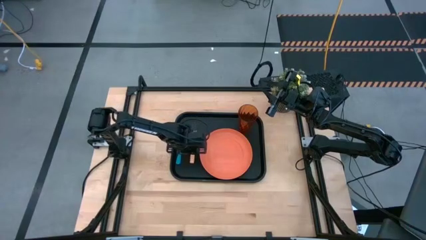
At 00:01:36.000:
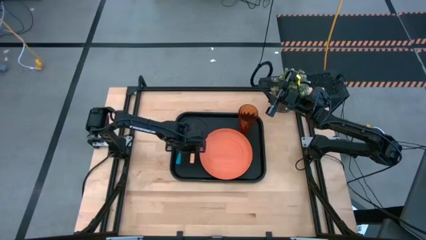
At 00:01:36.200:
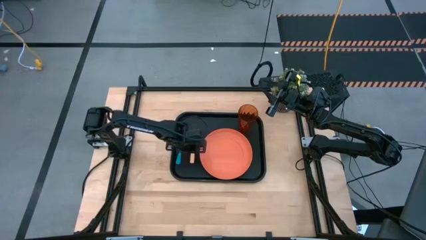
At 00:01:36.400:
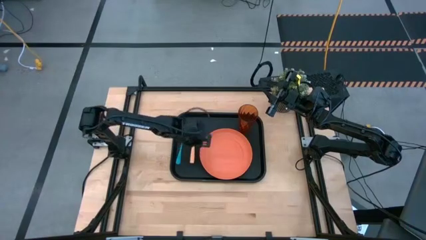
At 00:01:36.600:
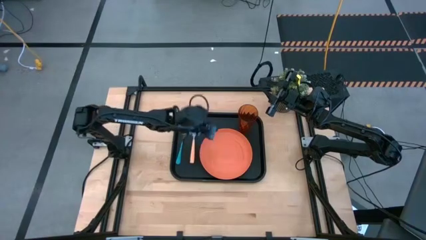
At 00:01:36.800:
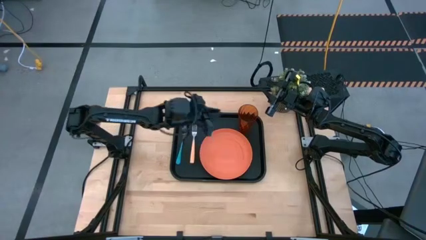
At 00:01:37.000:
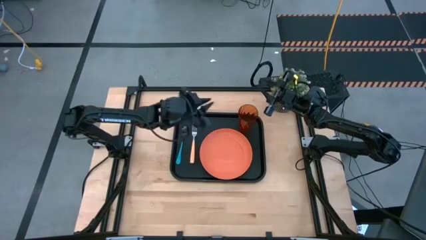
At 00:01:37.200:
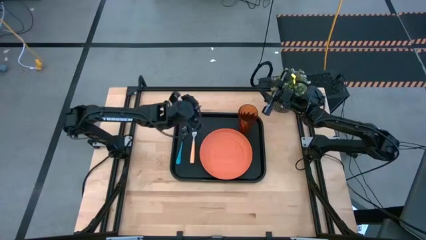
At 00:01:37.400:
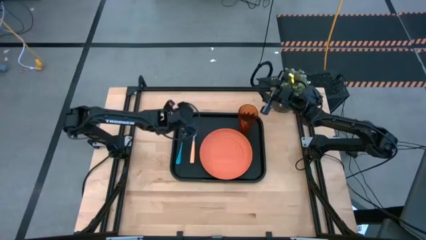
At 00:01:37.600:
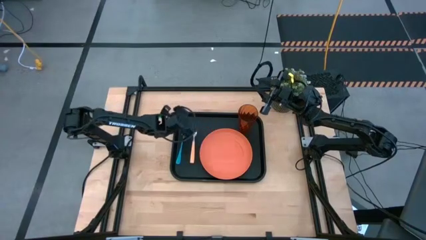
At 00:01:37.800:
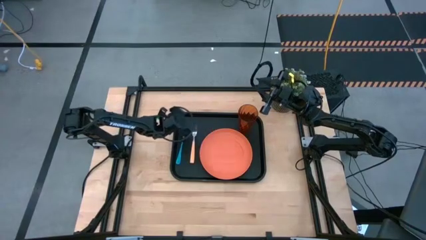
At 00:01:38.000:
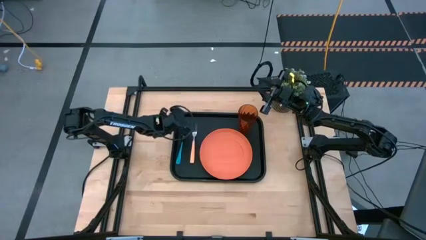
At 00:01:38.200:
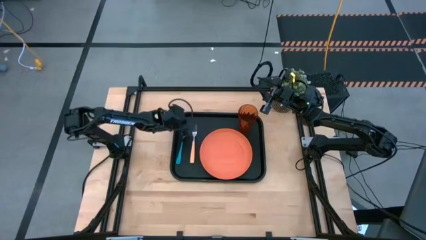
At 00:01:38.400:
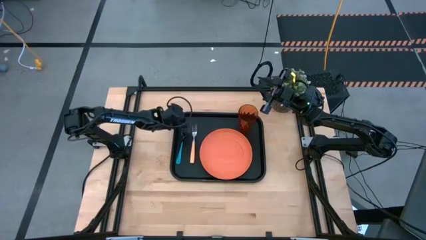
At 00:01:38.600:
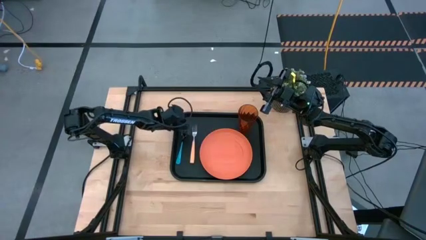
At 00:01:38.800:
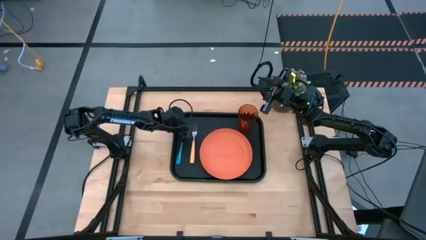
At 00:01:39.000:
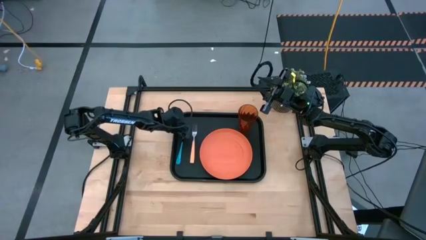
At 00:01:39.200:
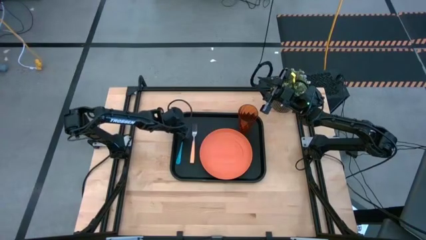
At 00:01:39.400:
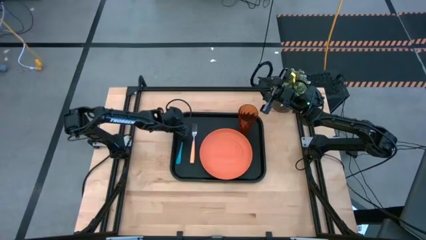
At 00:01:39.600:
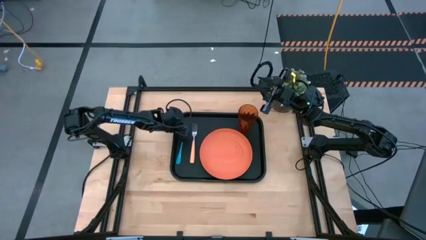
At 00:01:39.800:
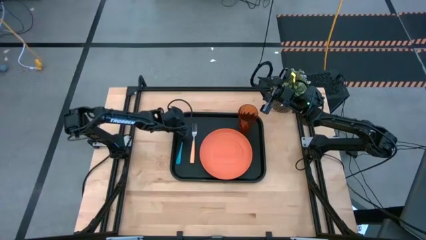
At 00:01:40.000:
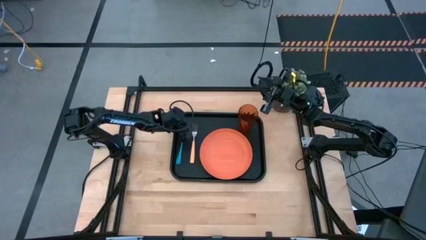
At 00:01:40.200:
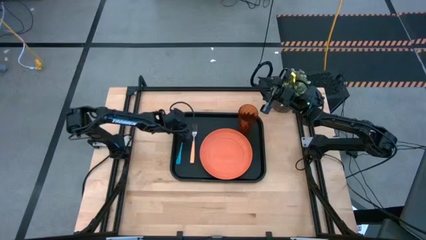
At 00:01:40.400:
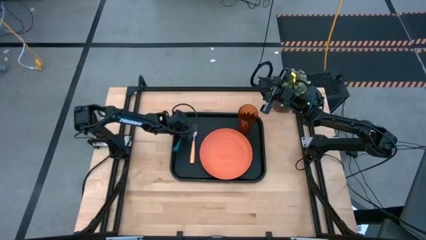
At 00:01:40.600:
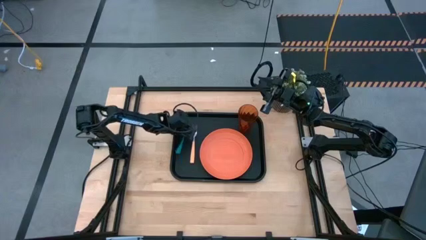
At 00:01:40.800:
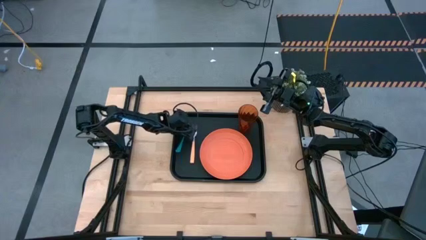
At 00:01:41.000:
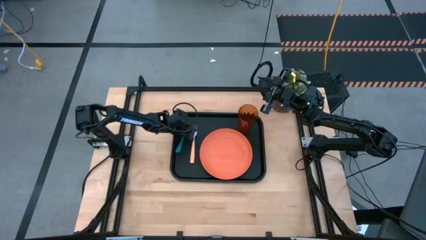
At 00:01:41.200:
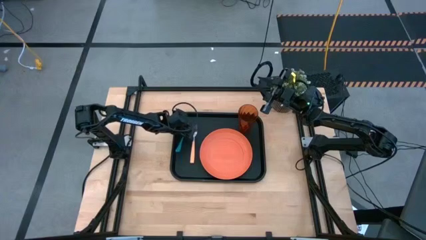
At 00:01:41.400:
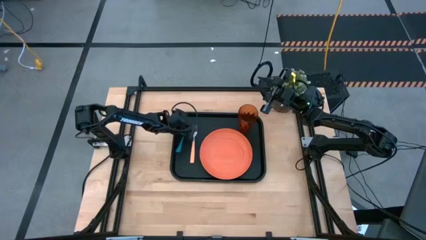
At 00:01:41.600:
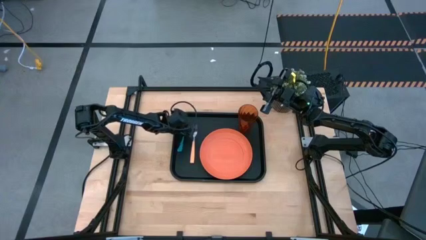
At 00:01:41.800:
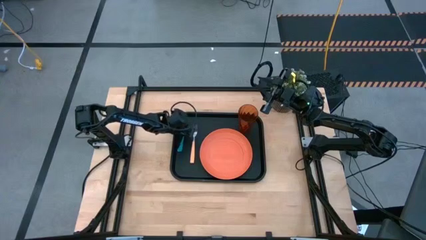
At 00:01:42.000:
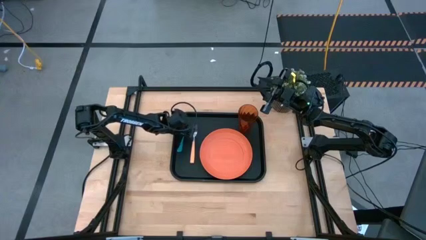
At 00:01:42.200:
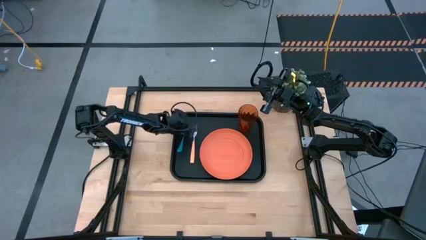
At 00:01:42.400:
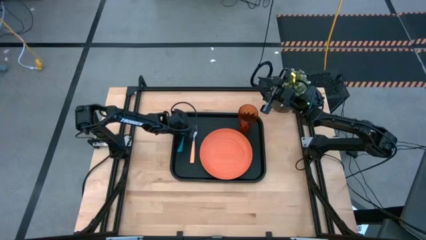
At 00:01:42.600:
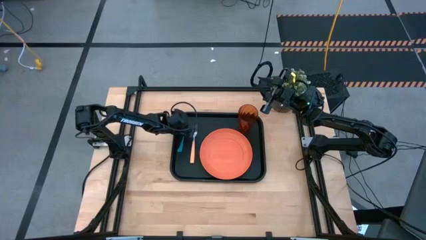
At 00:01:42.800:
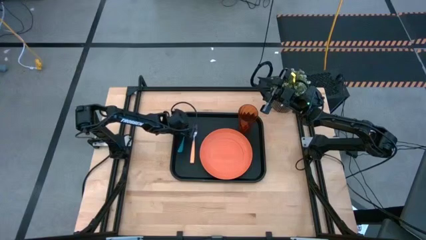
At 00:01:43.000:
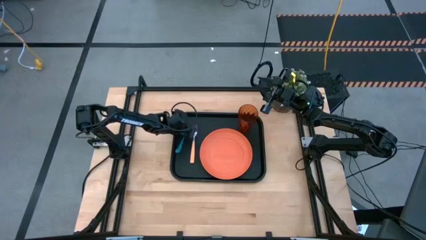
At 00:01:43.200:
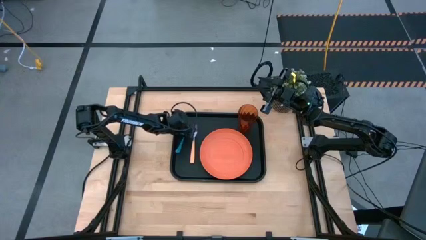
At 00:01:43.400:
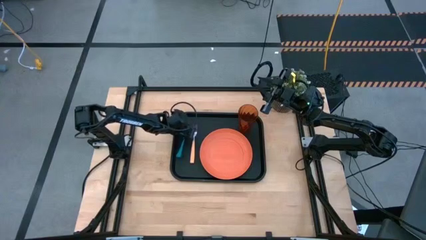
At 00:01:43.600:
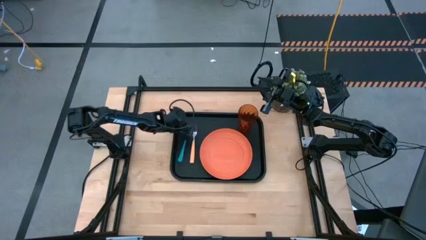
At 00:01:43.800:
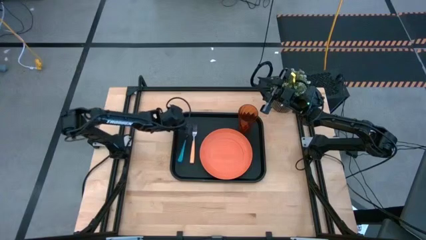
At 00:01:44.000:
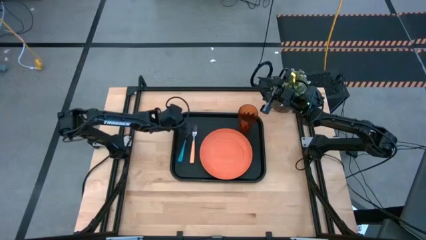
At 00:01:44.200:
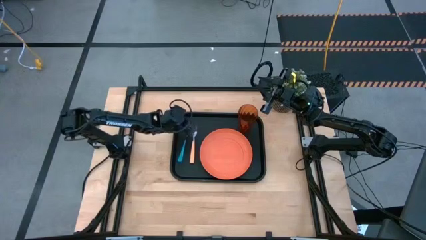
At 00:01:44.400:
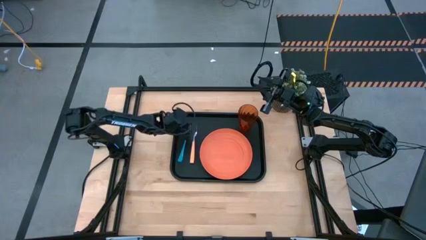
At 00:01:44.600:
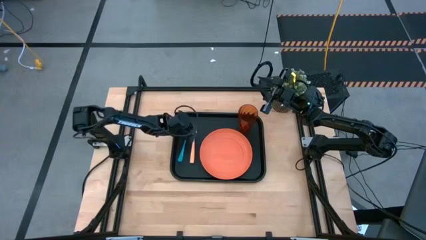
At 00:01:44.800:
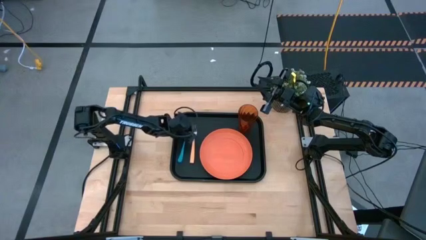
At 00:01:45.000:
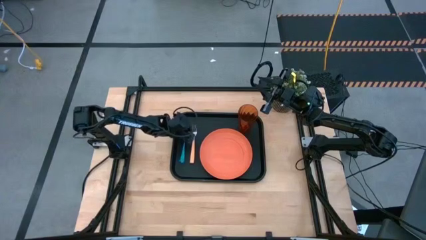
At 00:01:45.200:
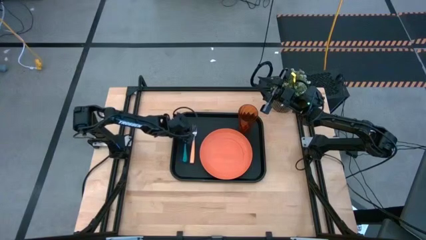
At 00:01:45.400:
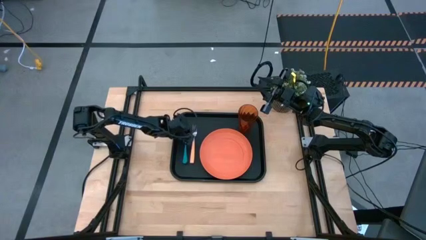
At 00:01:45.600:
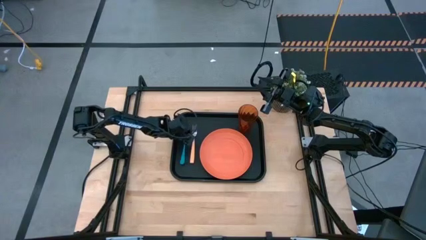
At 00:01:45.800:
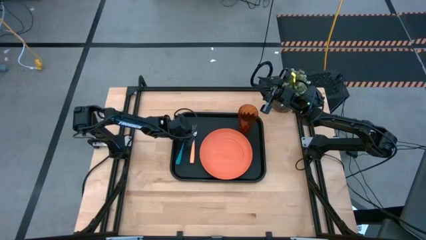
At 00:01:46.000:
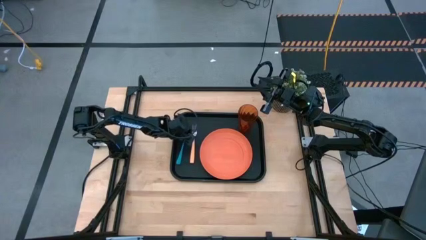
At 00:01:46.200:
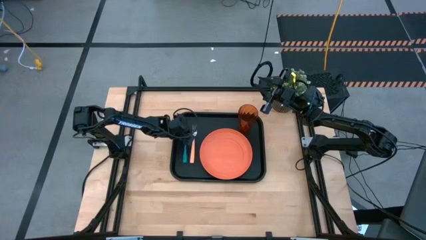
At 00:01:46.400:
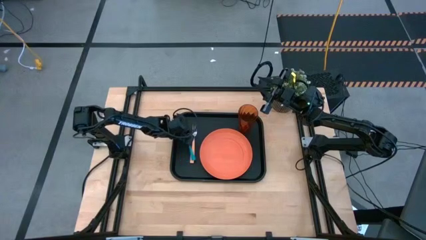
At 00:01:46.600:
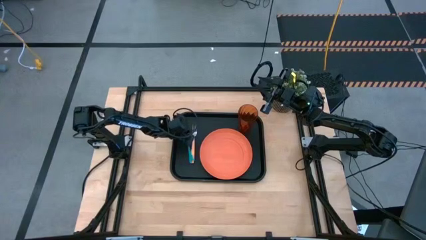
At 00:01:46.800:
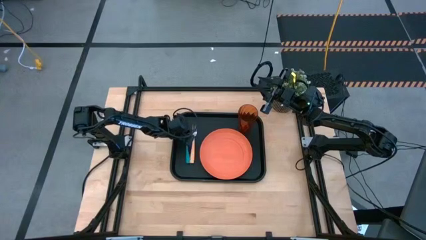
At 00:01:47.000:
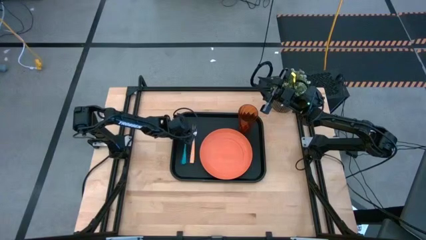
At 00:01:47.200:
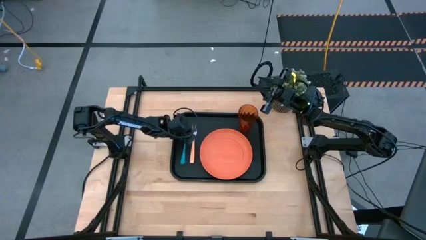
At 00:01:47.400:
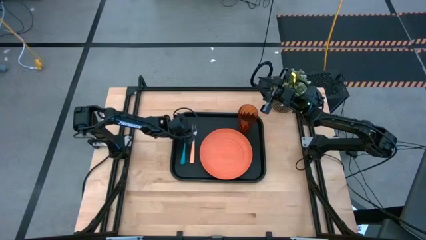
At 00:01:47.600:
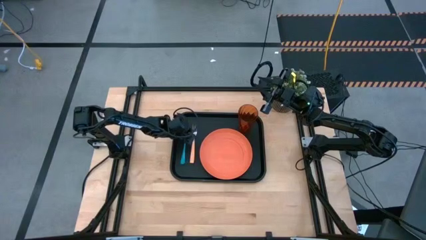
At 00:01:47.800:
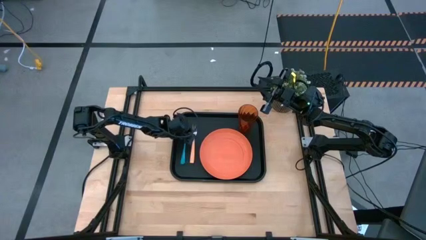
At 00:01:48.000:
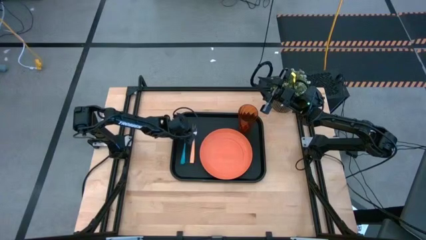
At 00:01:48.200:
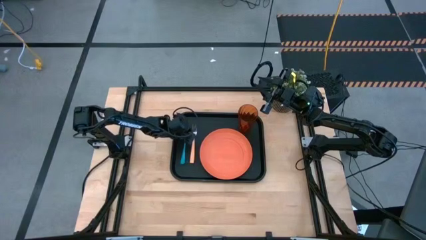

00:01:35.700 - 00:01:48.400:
Task: Pick and place plate/cup/fork/spoon on tray
Adjust the blue spoon on the black serving tray
